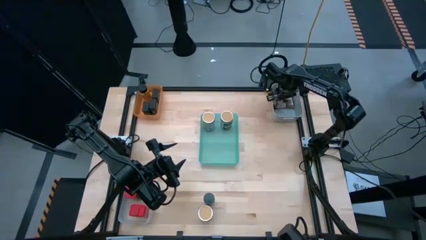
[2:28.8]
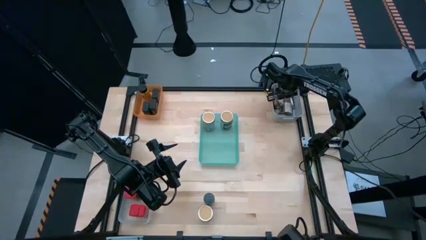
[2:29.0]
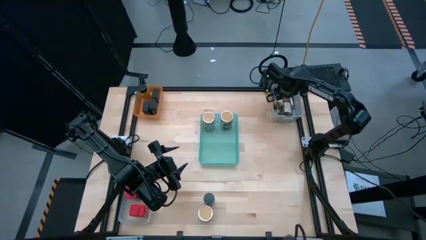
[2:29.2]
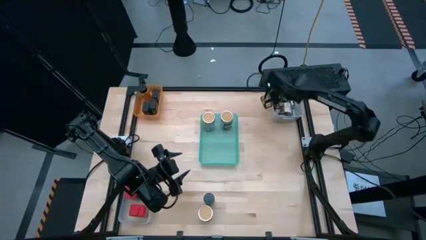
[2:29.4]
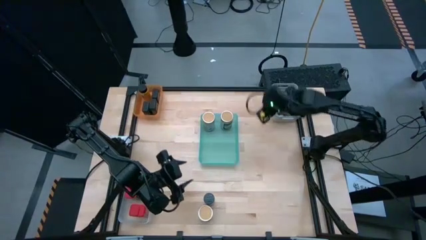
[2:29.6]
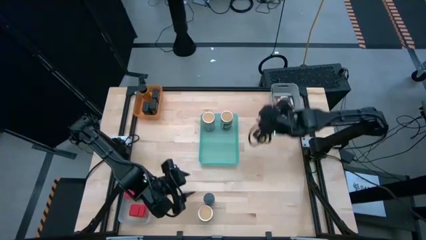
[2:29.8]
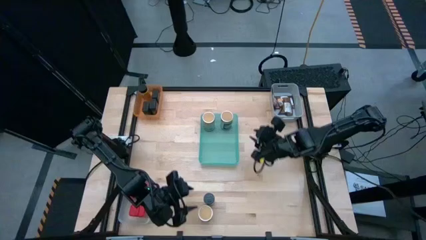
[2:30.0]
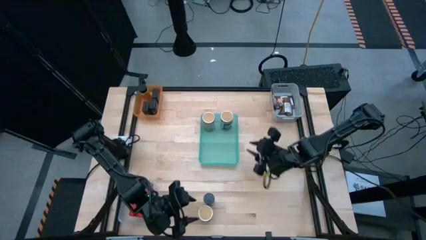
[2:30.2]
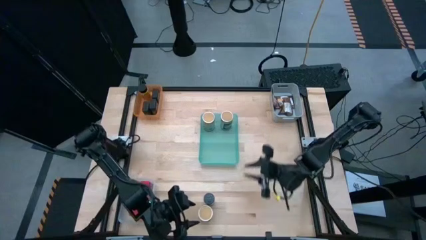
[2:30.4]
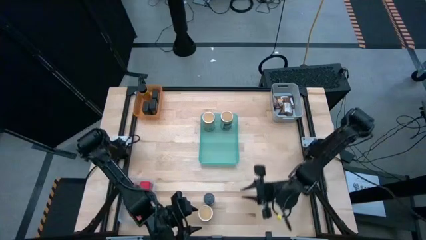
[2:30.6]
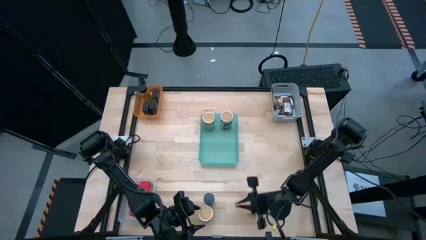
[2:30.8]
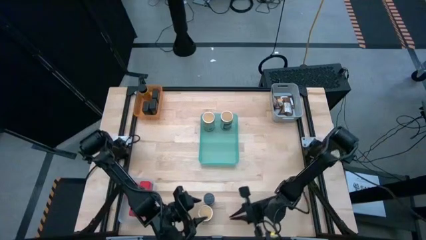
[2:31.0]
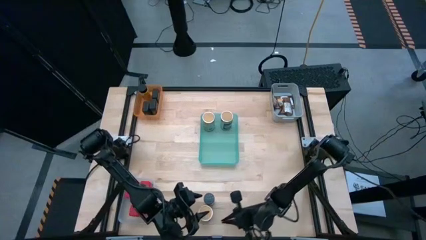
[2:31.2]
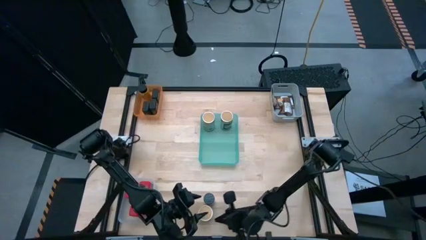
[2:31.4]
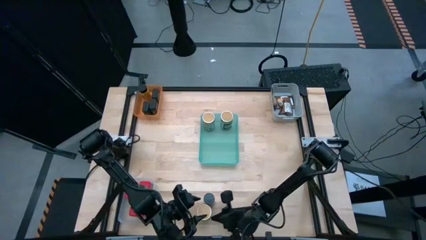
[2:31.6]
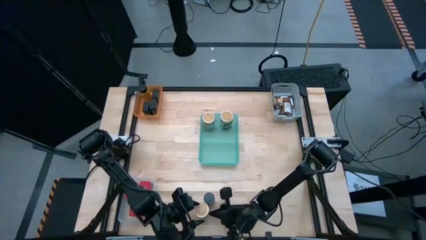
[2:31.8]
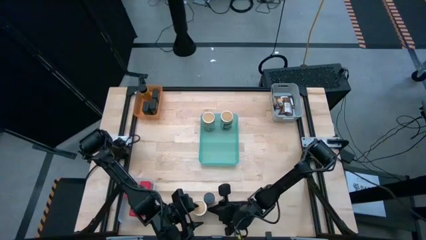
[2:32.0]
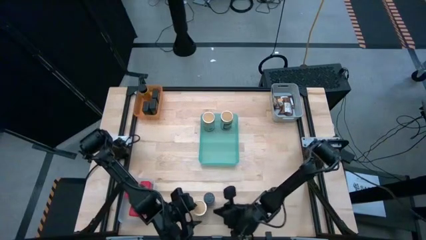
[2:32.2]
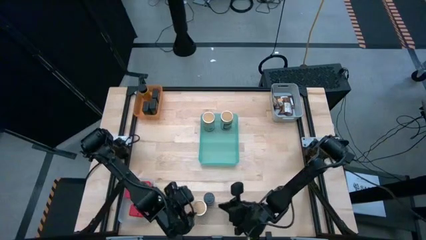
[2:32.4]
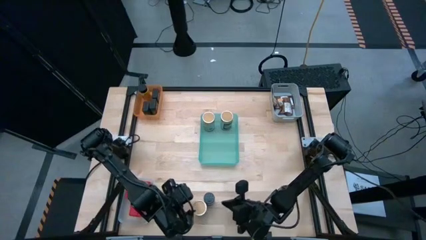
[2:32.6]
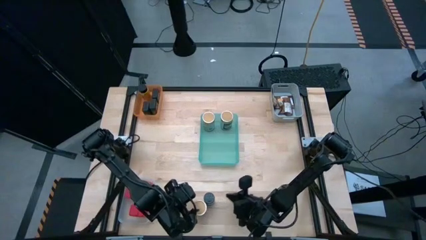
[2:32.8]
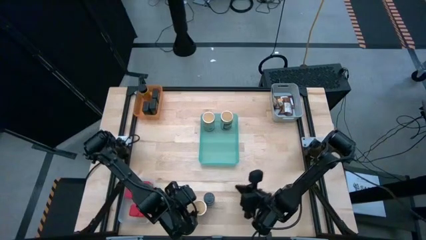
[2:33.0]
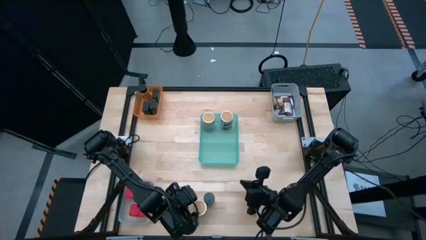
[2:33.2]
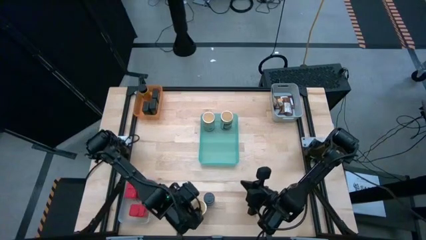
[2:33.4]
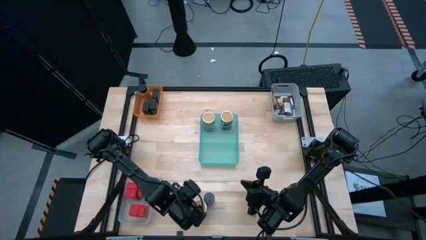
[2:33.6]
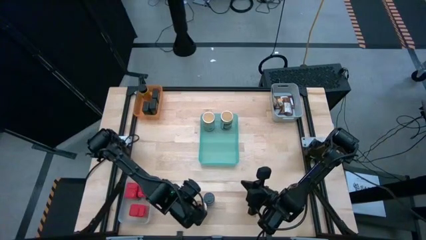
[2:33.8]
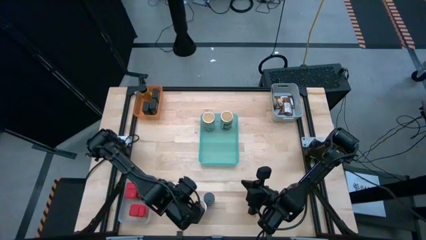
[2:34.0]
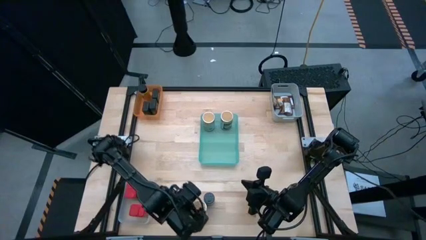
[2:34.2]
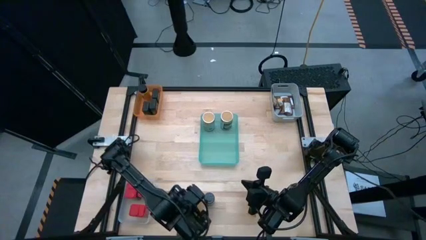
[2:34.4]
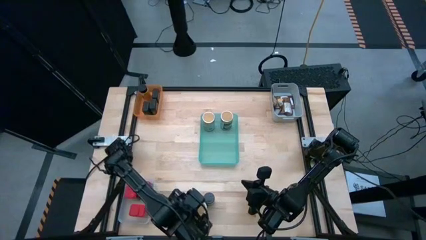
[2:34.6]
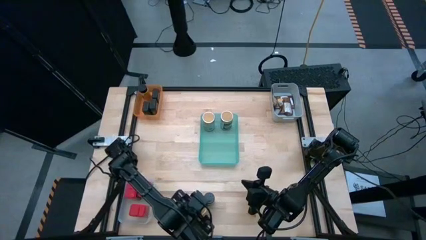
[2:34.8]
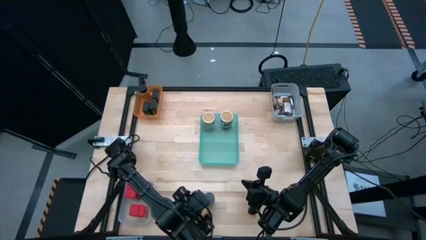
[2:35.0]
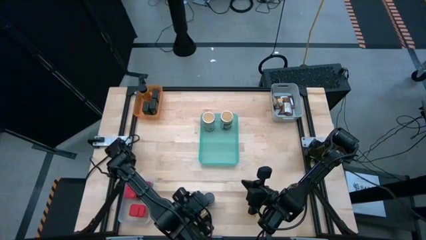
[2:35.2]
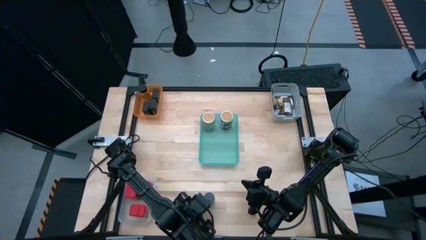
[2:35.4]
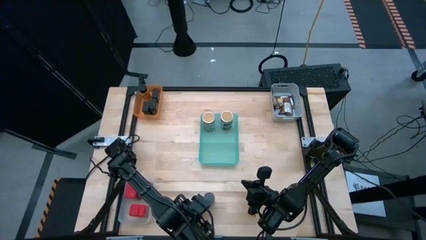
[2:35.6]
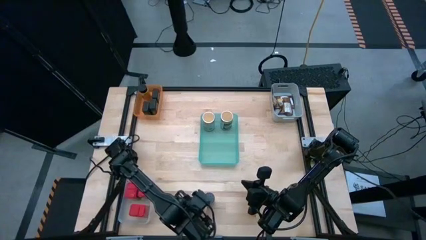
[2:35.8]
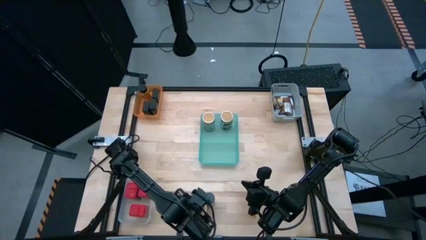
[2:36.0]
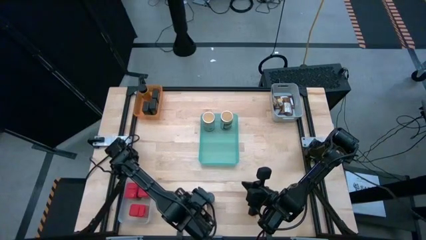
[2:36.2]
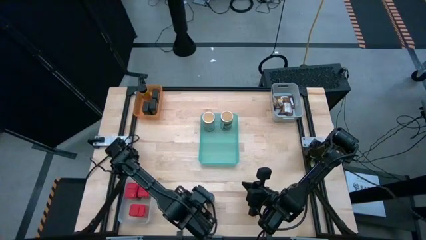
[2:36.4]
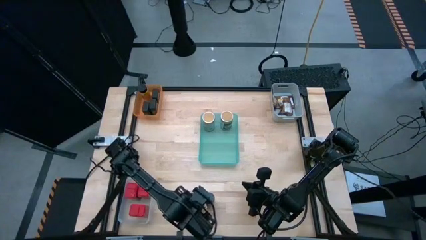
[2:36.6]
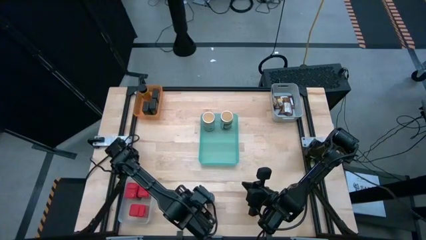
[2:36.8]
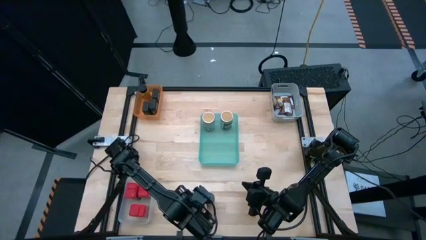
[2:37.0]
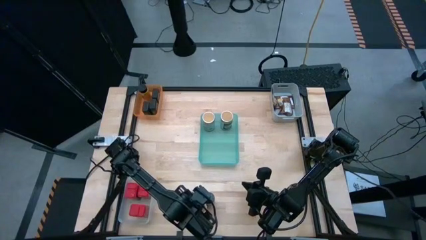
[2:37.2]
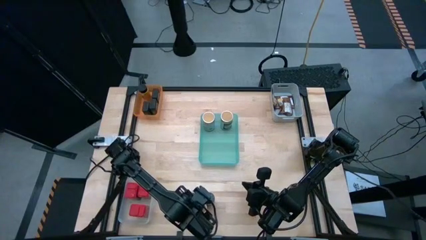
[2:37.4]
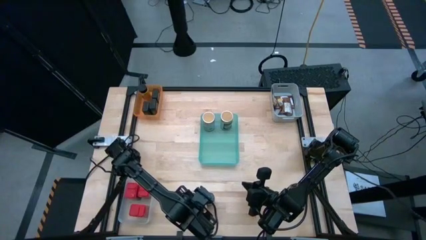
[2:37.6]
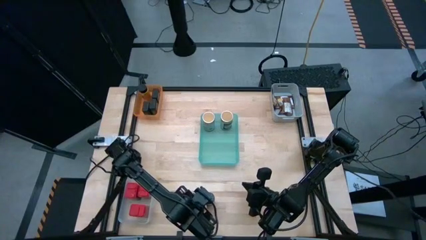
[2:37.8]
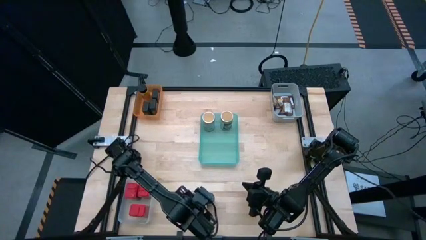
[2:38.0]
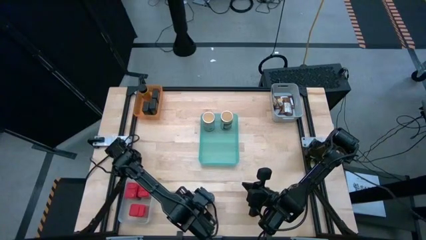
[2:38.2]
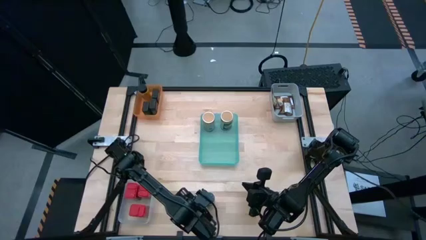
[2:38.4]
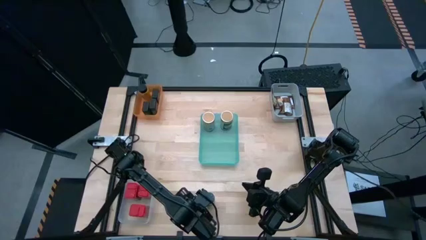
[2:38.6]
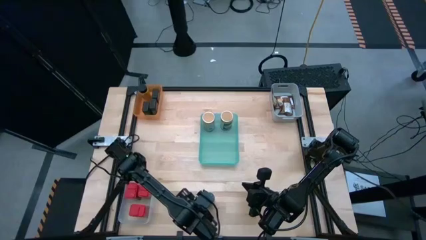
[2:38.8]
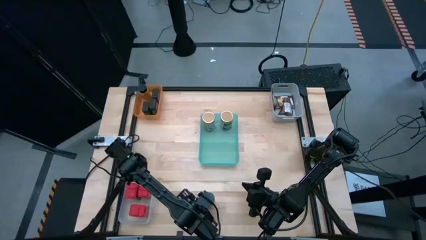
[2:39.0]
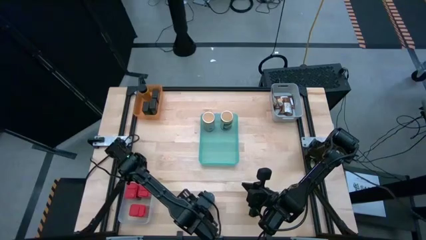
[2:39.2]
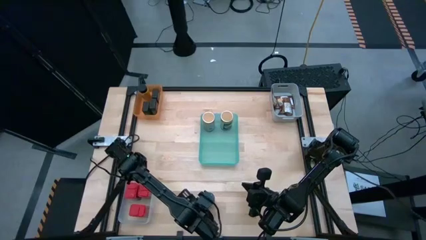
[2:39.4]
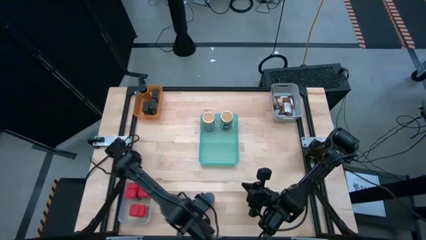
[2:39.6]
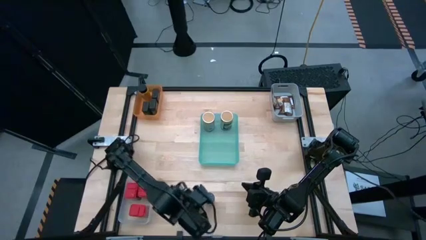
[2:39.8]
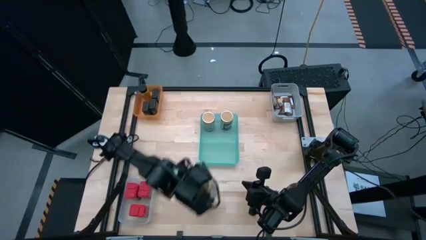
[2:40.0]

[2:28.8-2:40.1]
Task: Sort spices by type
Put the brown seasoning bottle into the green bin
